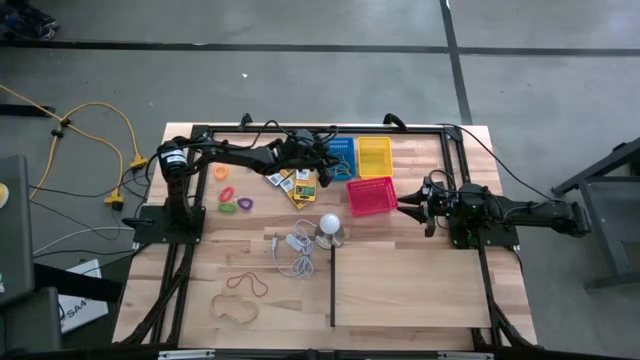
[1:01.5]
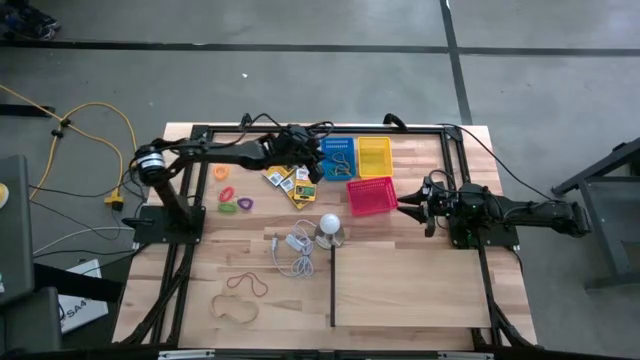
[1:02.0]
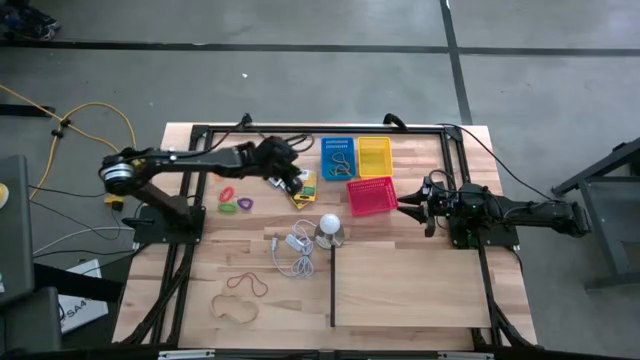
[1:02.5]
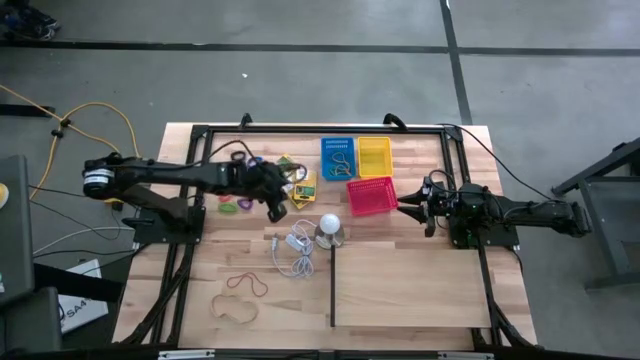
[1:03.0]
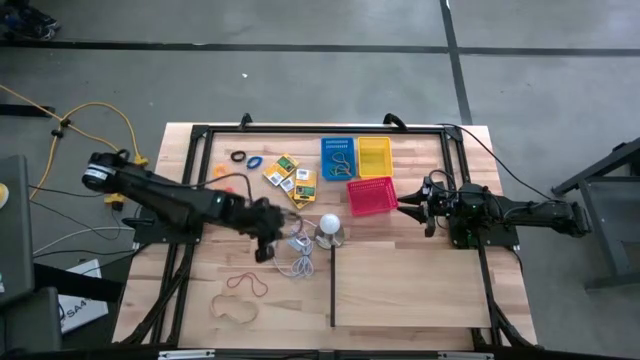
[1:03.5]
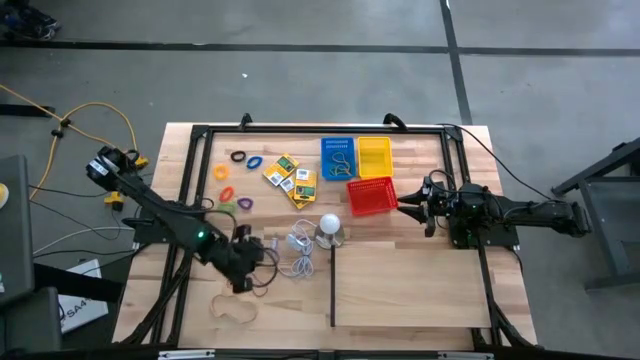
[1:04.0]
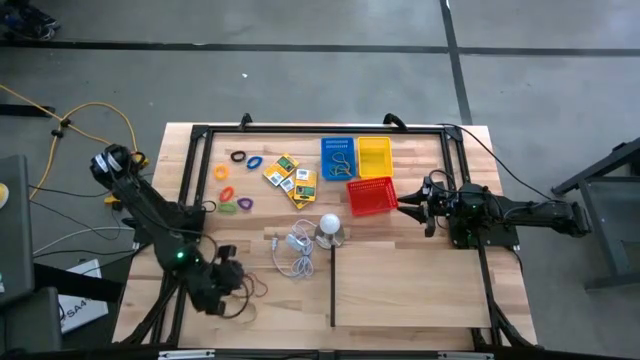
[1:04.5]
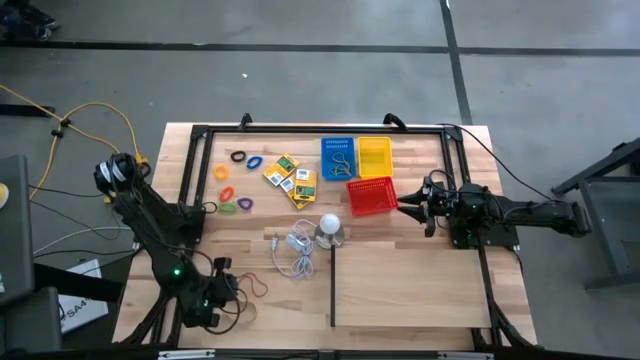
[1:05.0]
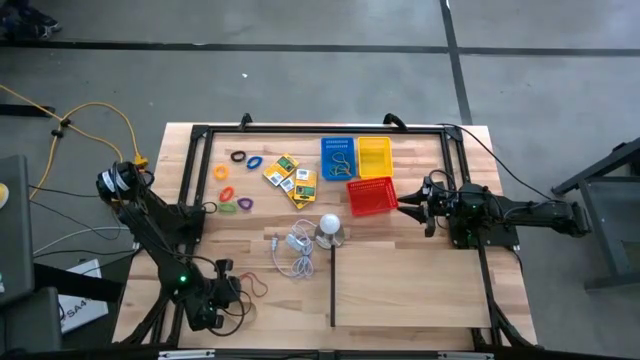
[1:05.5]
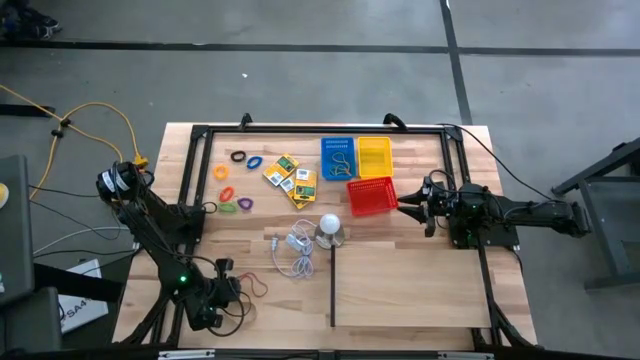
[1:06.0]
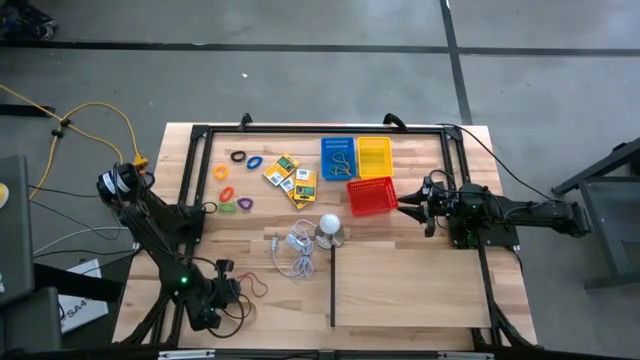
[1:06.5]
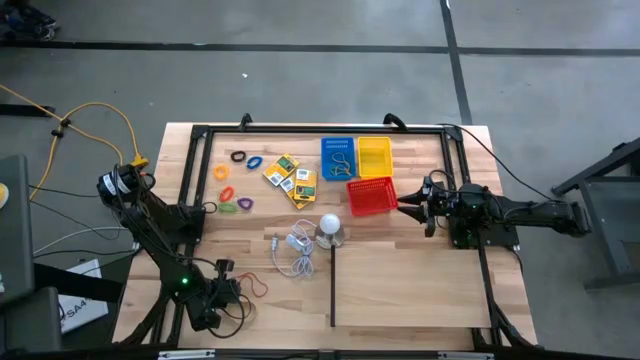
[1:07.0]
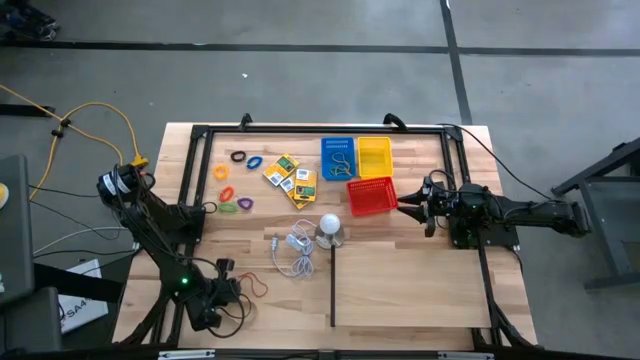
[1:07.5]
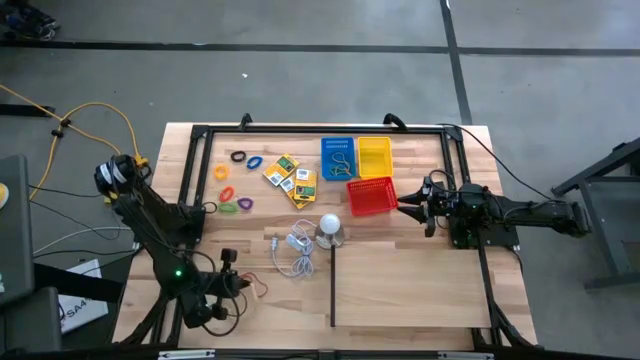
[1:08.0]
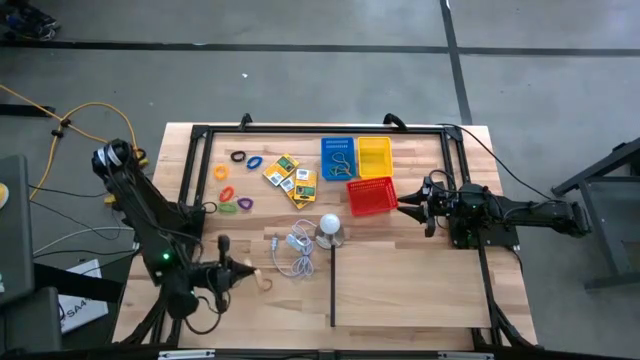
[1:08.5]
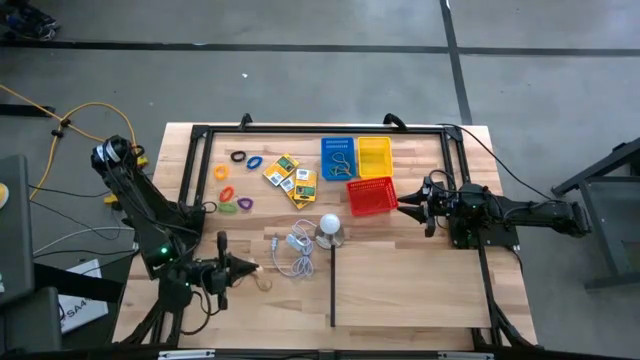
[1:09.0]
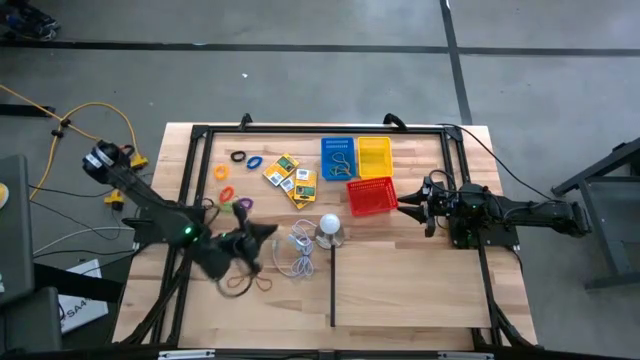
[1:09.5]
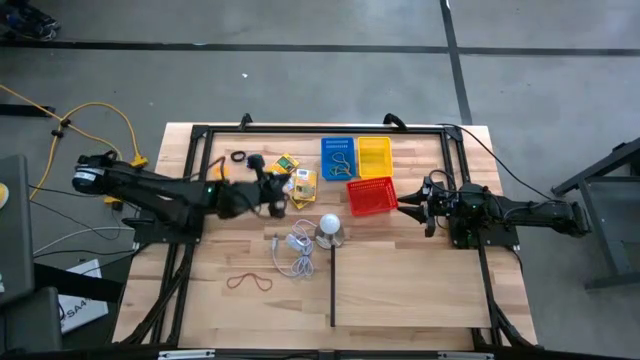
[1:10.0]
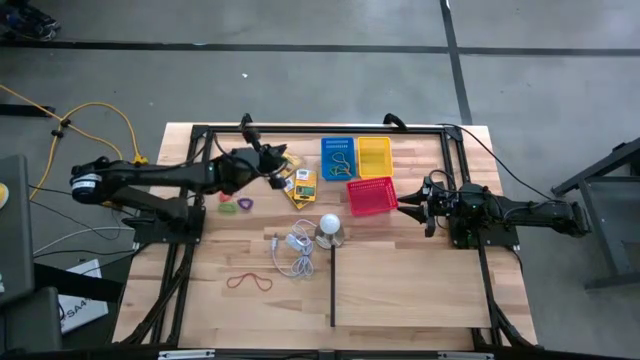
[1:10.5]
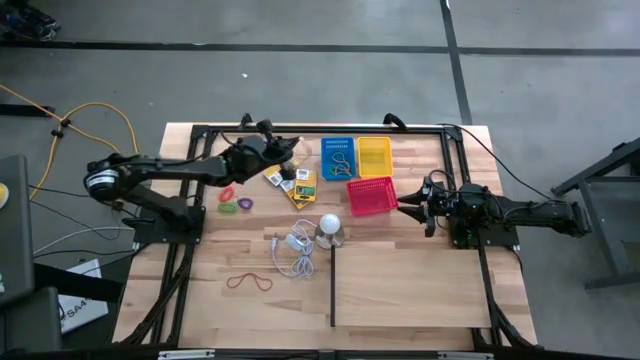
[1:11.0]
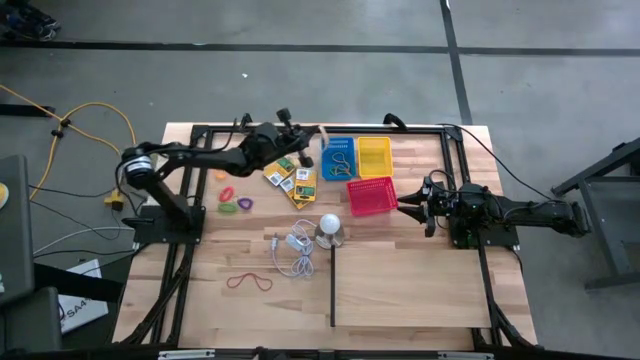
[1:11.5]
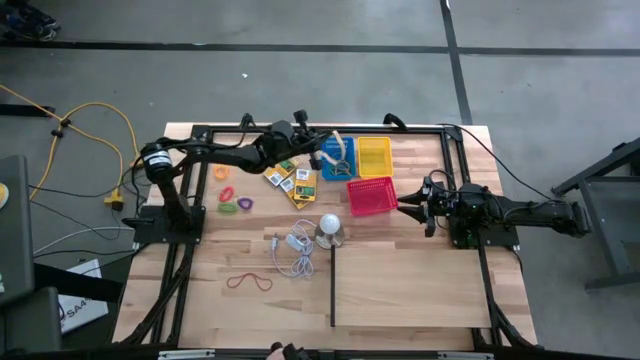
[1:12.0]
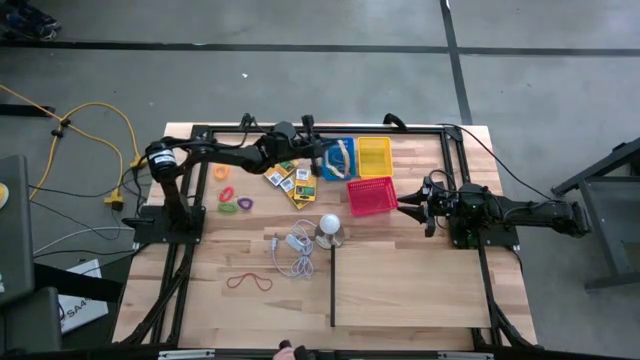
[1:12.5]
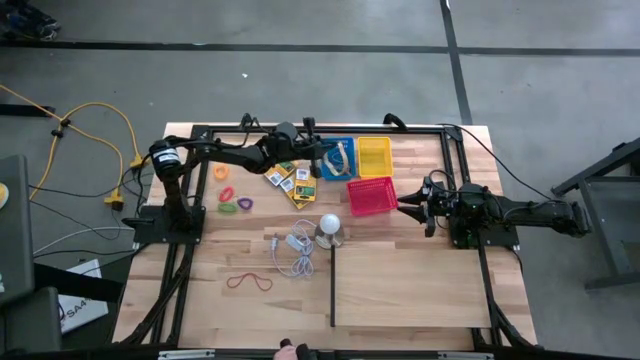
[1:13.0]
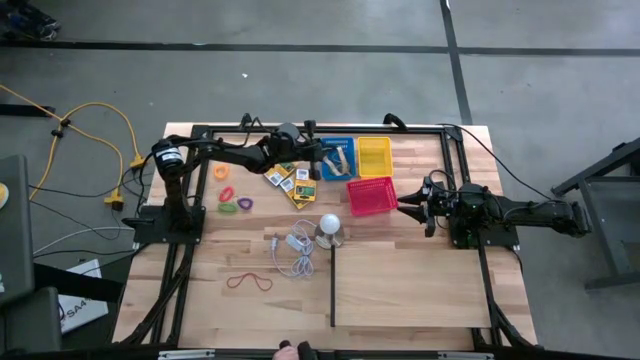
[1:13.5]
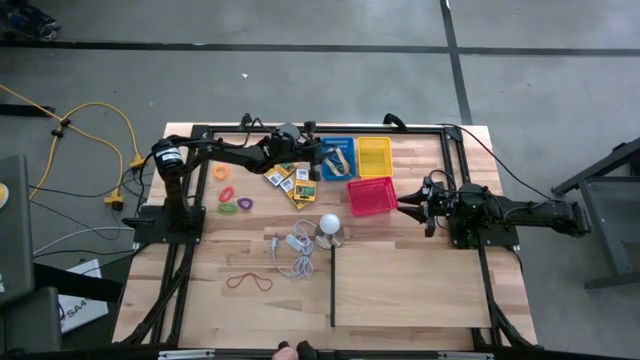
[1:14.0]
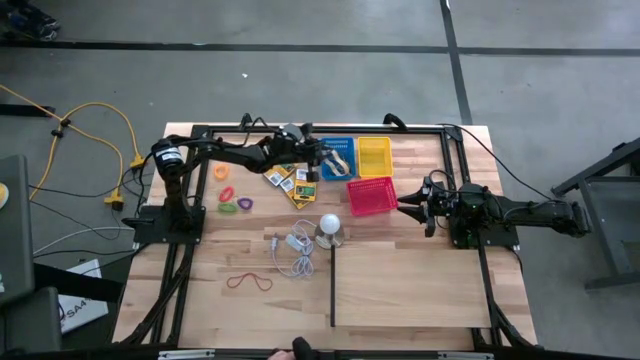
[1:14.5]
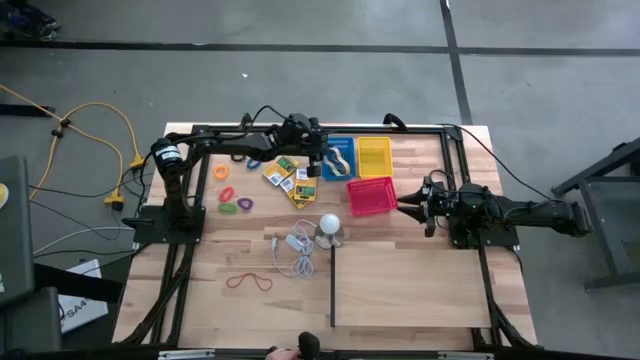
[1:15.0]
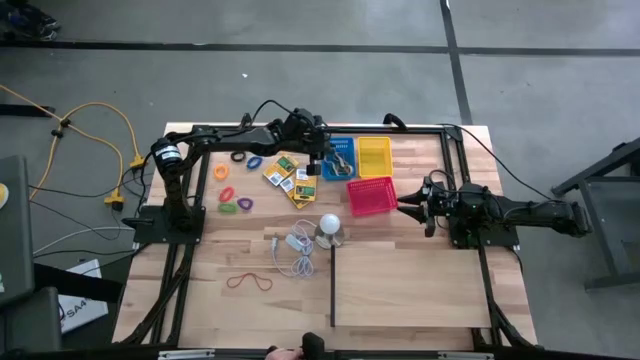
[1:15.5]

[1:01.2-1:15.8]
Task: Pick & Place Office Desk Supplies
Put the white rubber band into the blue bin

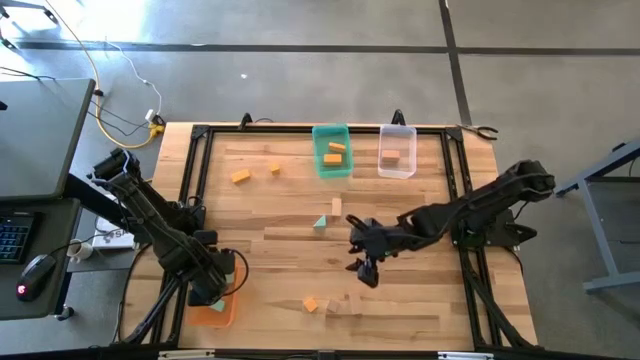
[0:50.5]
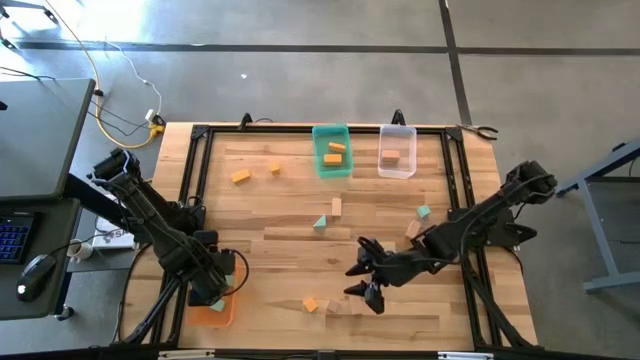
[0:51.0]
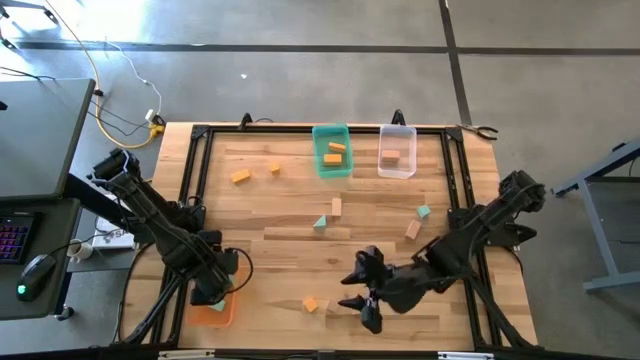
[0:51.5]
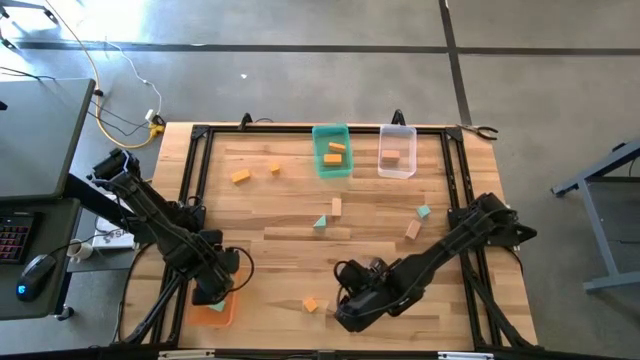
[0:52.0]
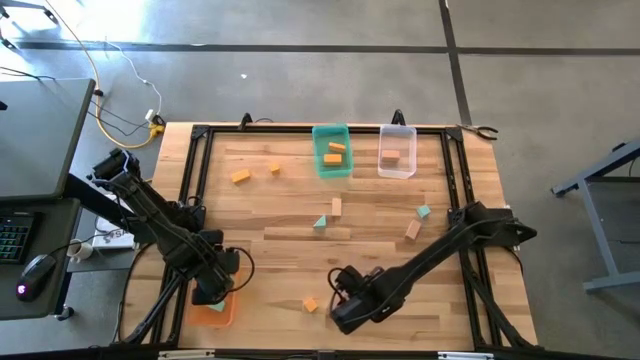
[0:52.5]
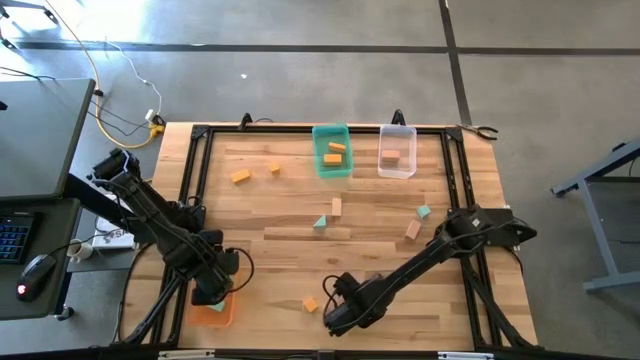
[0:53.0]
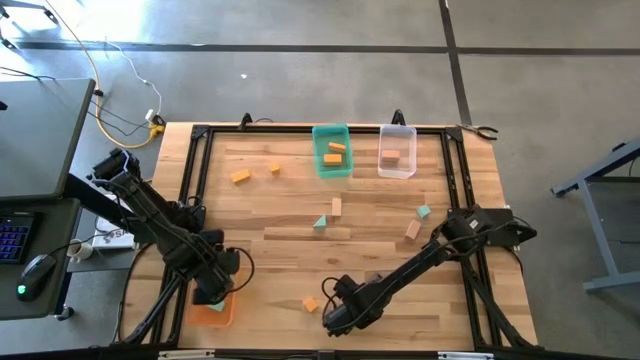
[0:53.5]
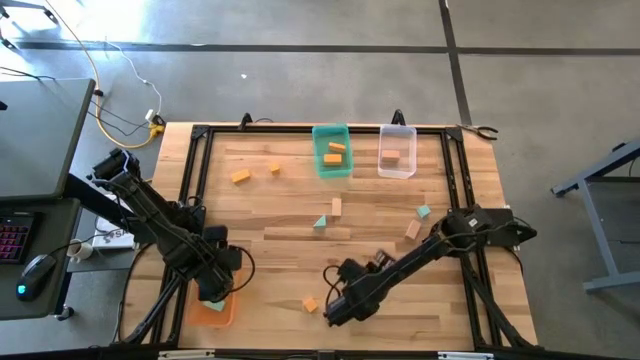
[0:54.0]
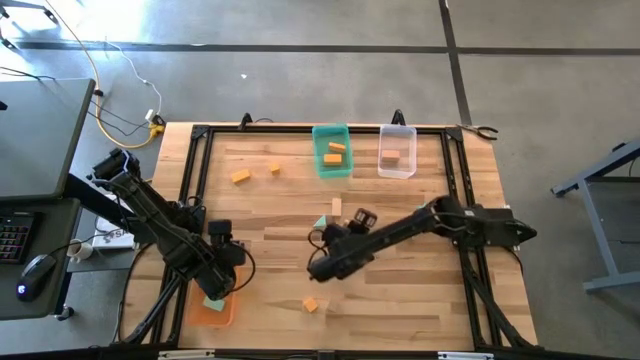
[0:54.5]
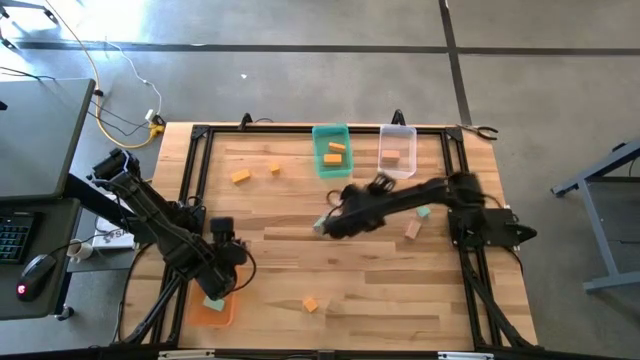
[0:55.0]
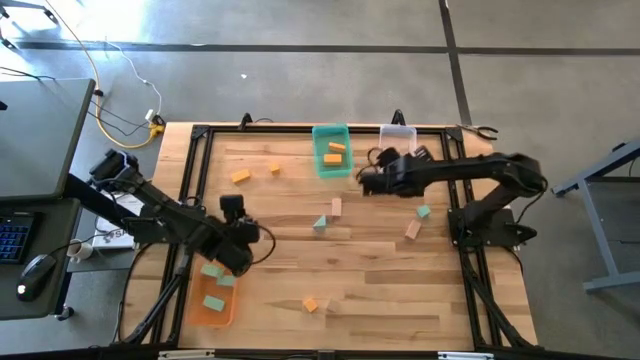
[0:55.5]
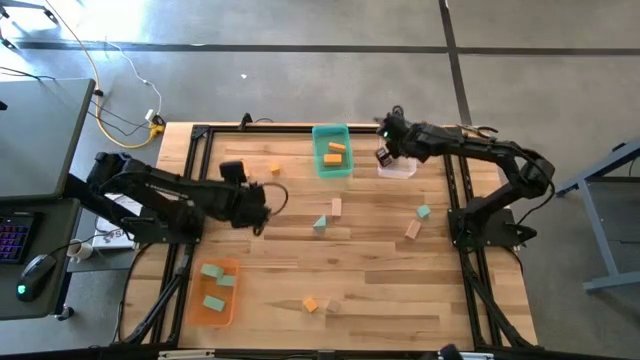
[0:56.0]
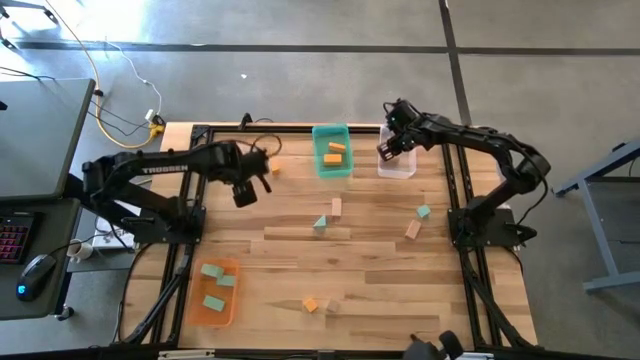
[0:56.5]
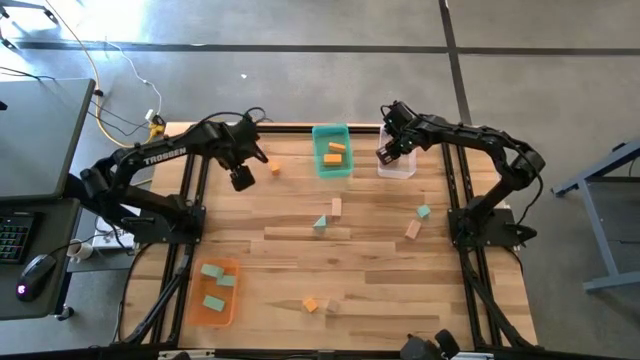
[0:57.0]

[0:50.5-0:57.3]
Task: Sort & place blocks by color
Put the brown block into the transparent bin
